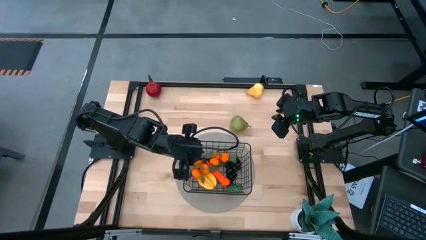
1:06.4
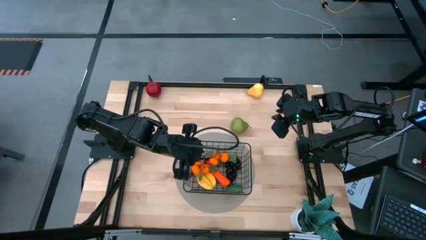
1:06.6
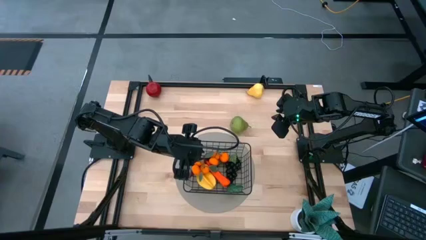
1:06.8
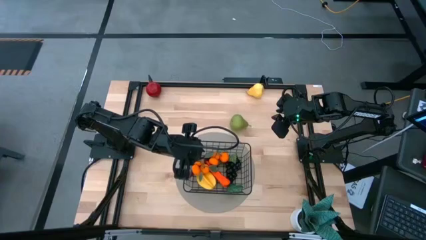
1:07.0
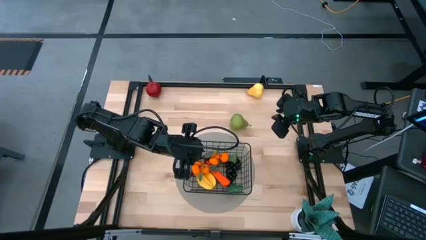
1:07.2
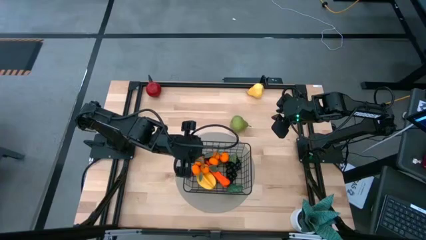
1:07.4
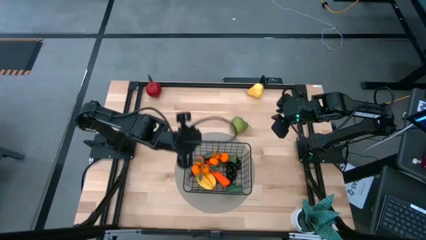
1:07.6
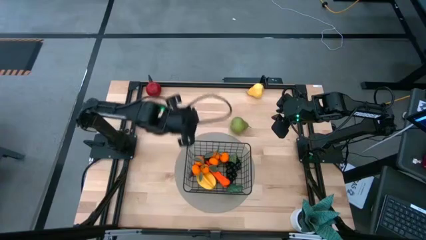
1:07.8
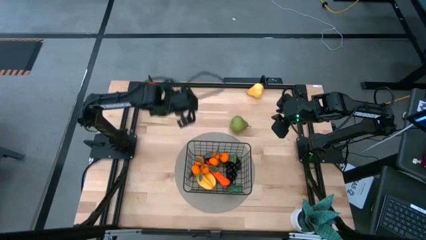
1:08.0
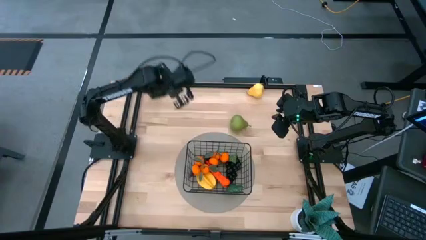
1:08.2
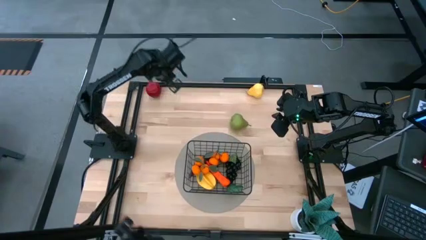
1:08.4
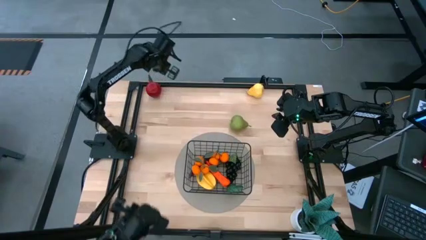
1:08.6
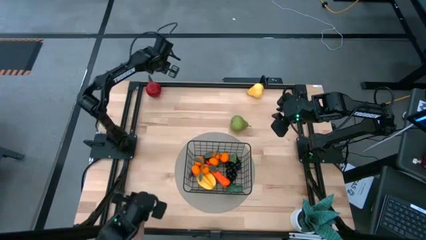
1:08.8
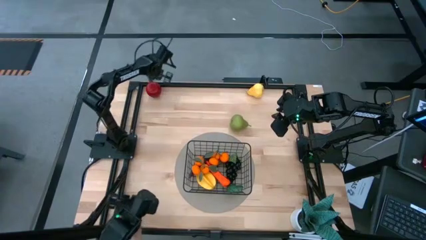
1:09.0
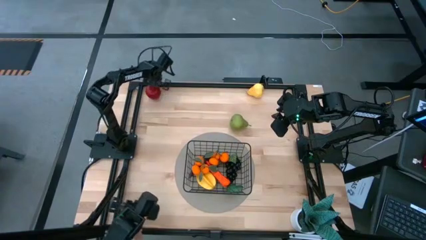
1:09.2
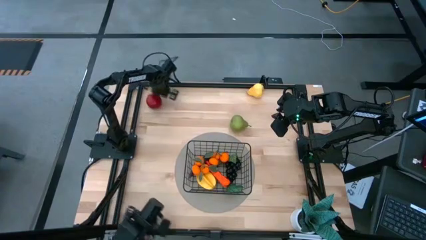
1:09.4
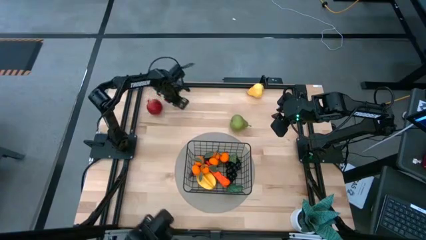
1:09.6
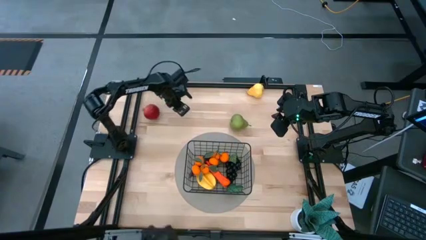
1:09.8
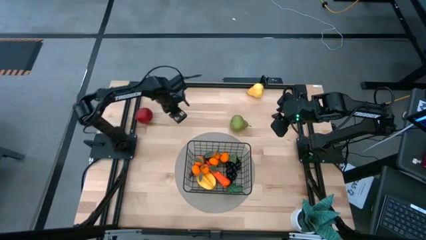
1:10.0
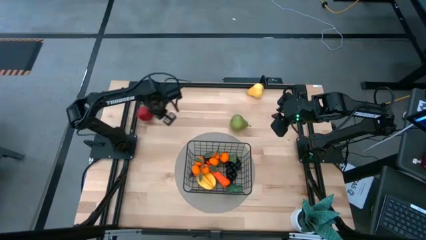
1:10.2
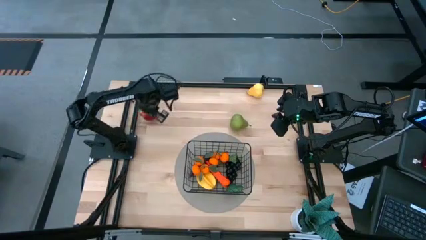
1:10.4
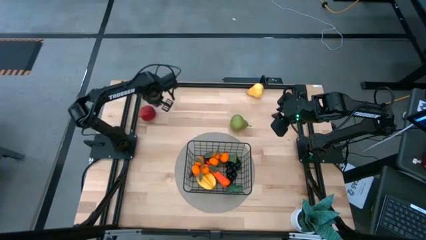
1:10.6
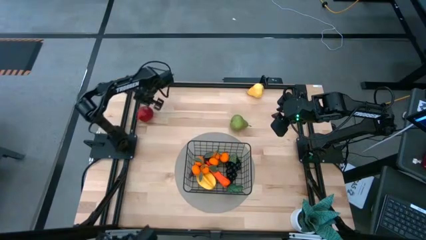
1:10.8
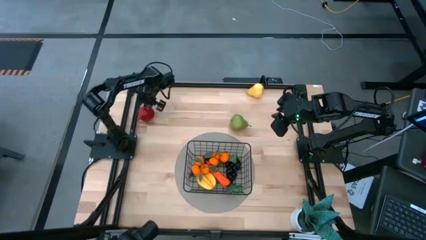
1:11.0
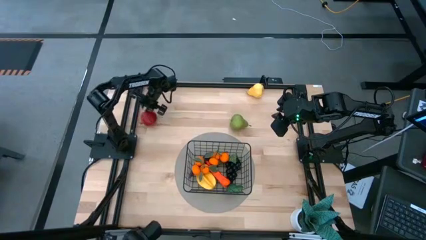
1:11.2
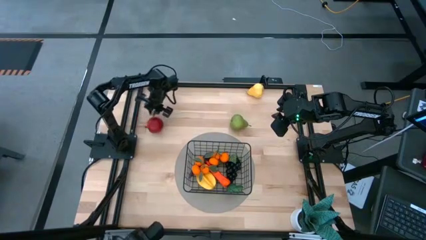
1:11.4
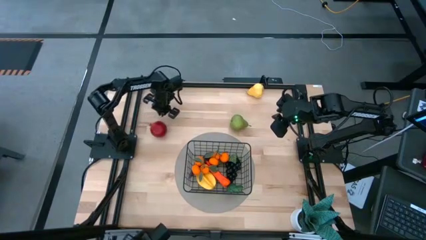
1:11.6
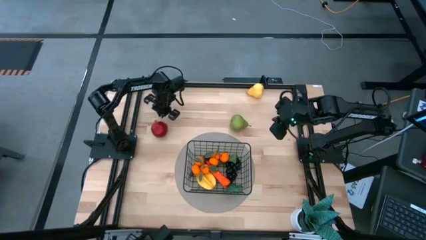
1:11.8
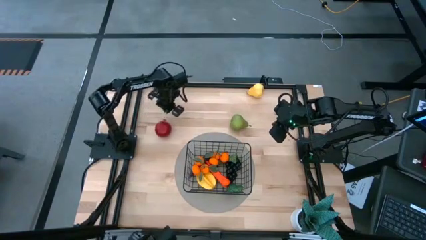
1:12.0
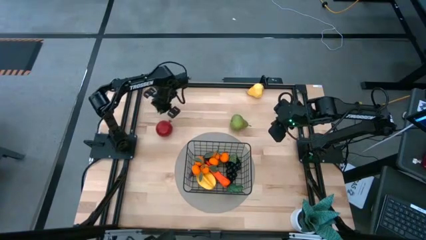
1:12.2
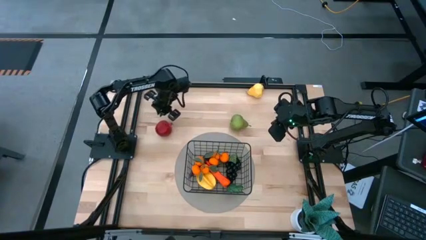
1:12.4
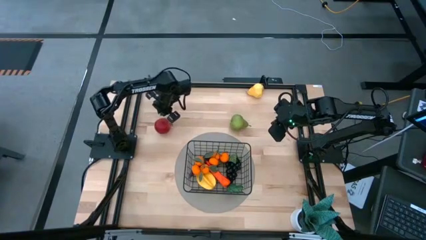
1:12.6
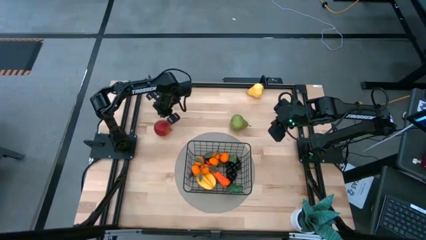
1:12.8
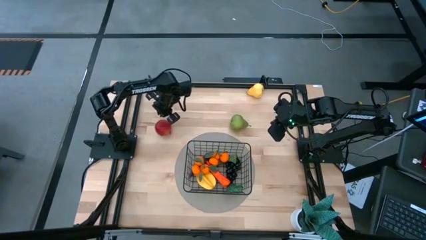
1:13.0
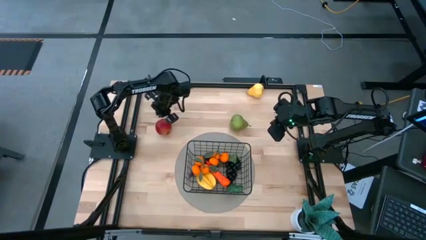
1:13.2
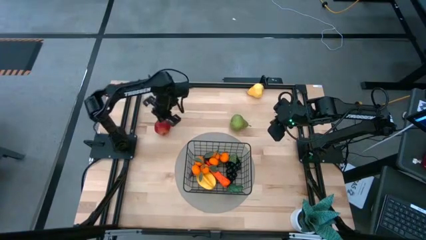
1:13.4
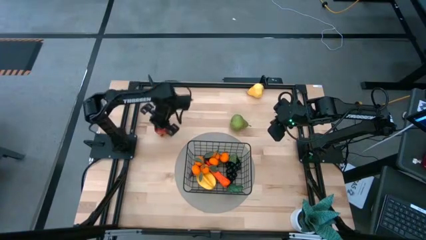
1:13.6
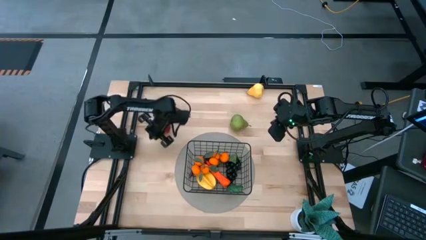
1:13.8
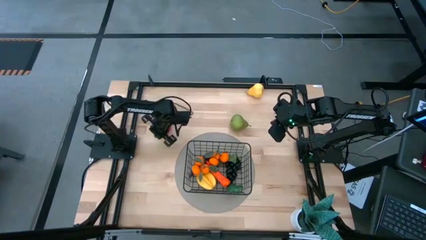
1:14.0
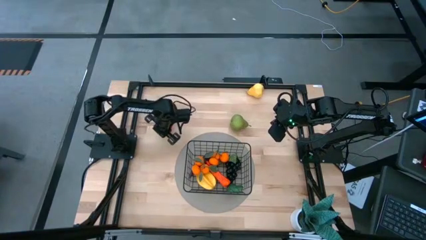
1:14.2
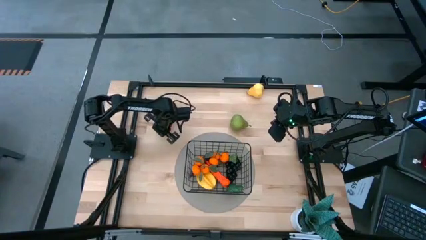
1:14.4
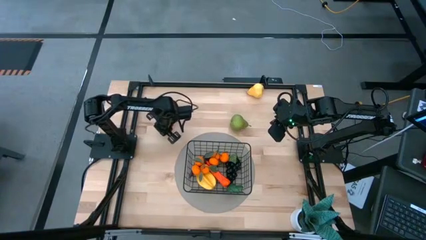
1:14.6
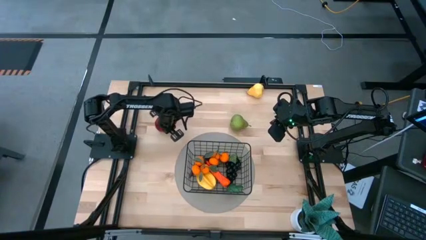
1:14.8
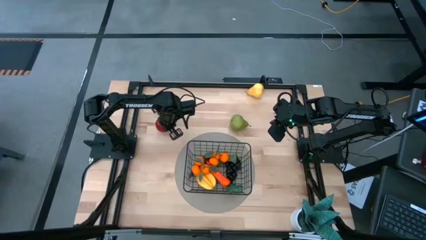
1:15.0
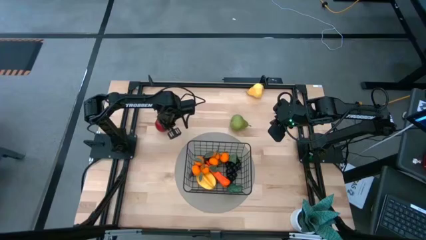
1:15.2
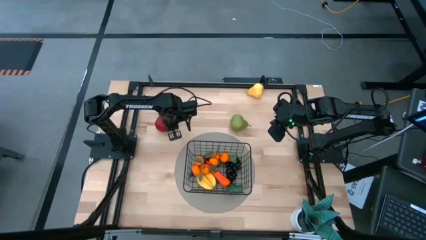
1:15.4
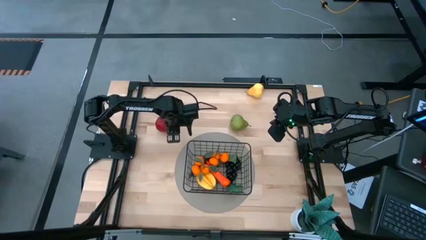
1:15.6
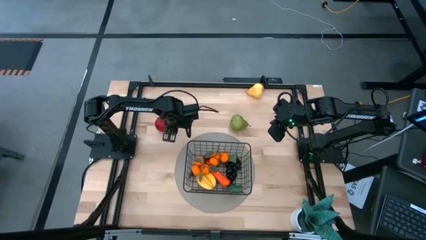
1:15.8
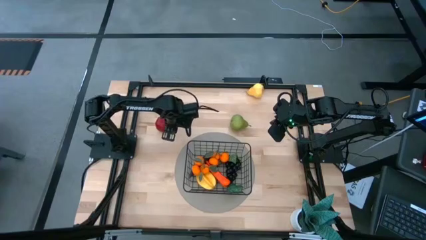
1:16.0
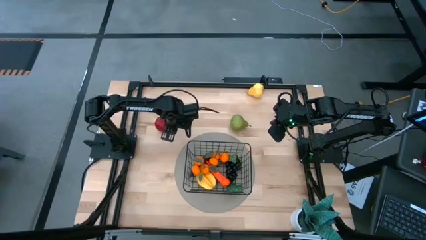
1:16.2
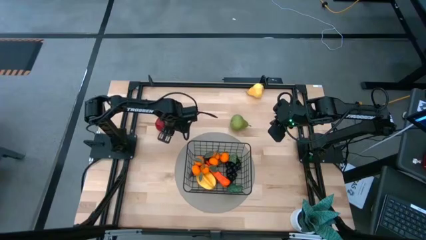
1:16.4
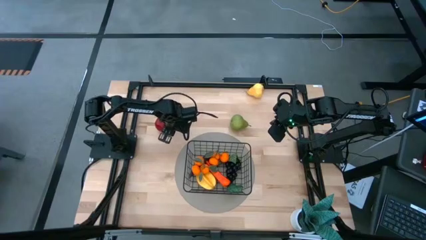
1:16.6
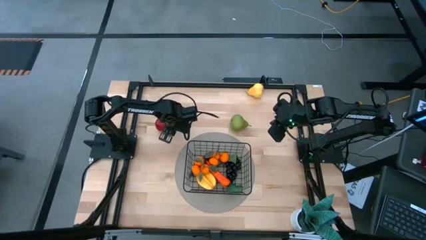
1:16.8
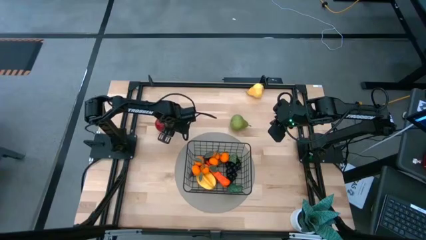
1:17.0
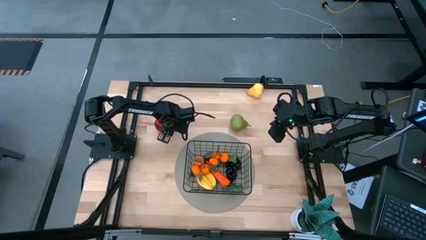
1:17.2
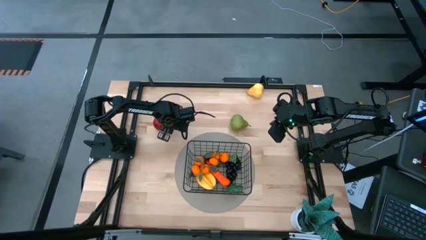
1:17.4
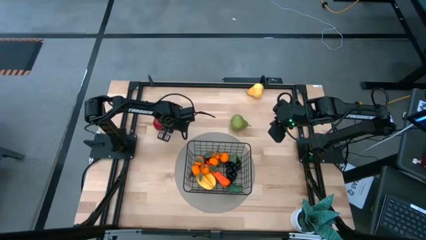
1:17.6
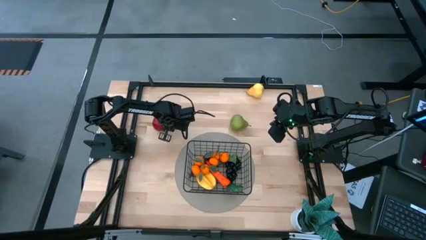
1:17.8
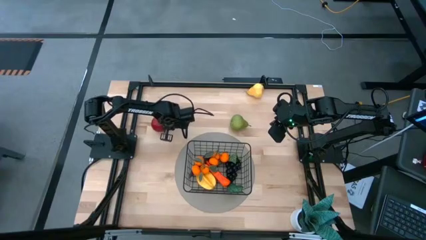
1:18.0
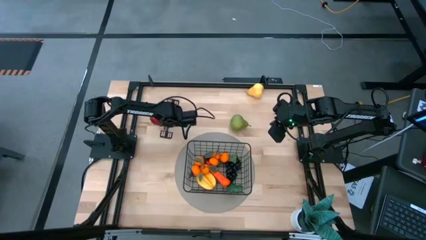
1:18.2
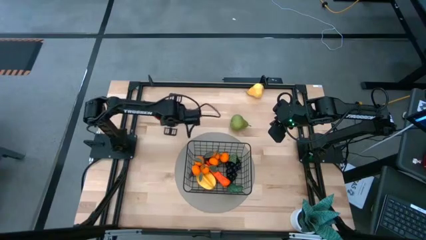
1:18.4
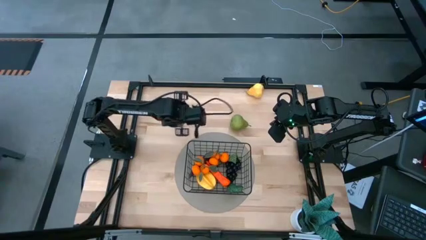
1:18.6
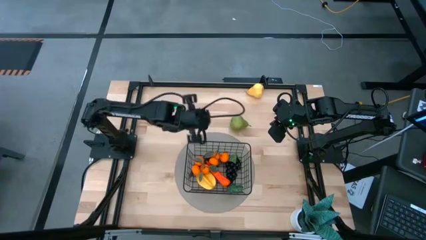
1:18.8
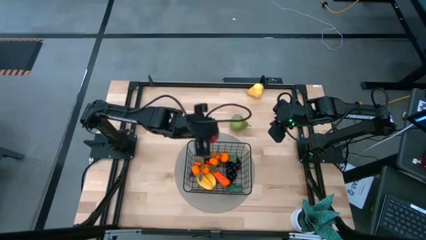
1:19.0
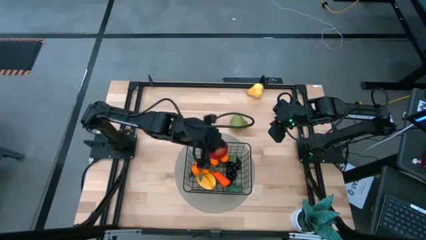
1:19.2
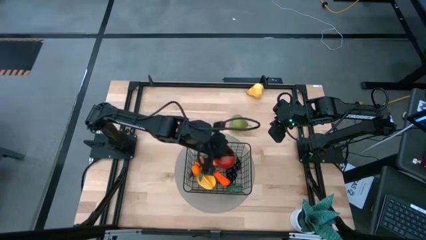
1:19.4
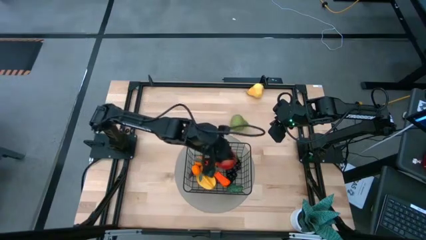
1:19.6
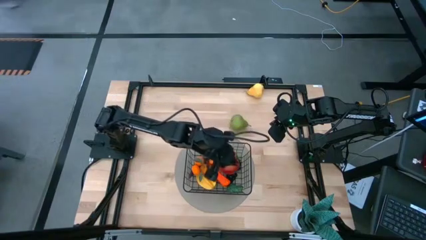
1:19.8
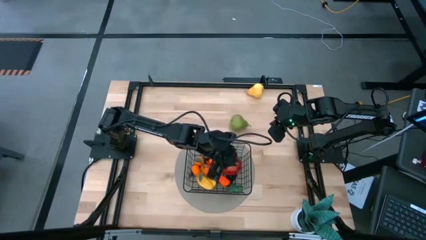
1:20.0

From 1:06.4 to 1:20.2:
Task: Build produce basket
Put the pomegranate into the wire basket

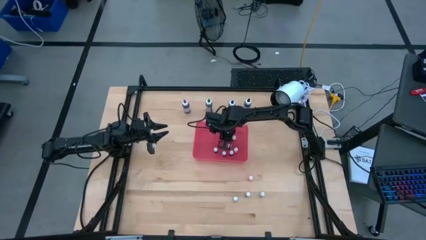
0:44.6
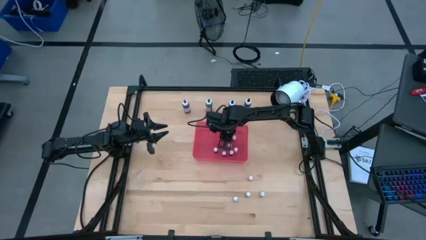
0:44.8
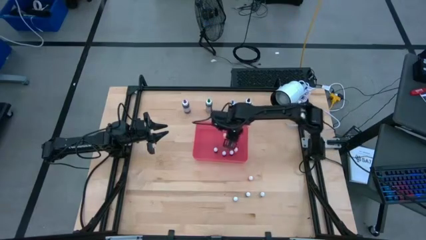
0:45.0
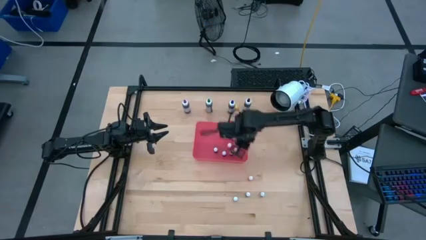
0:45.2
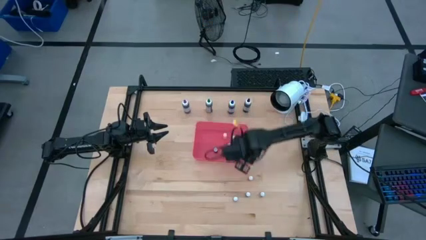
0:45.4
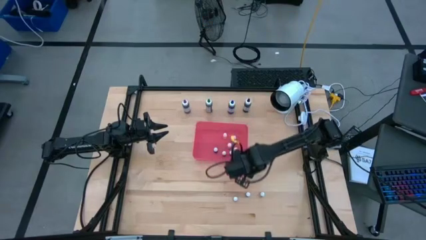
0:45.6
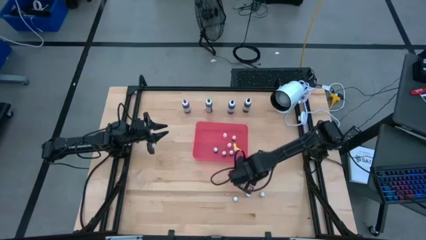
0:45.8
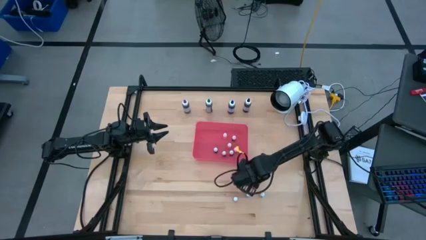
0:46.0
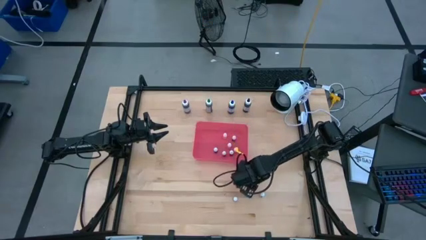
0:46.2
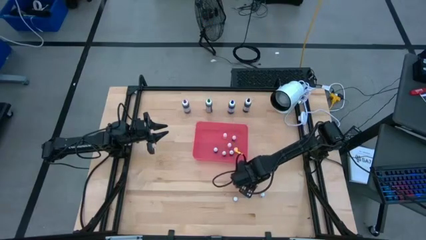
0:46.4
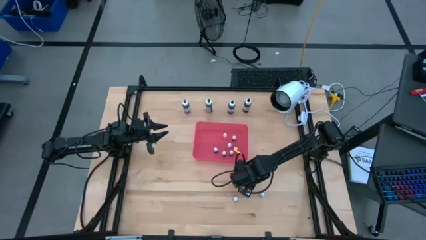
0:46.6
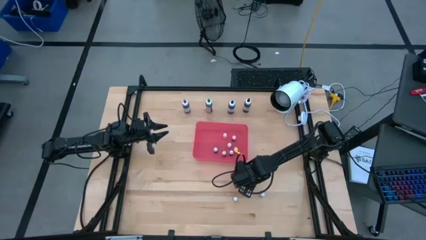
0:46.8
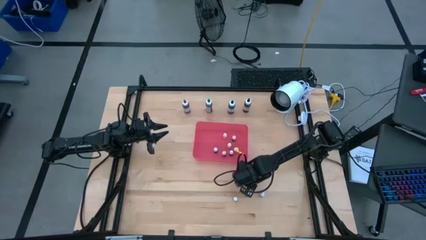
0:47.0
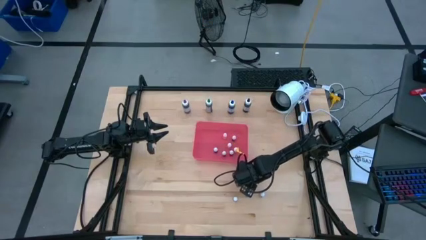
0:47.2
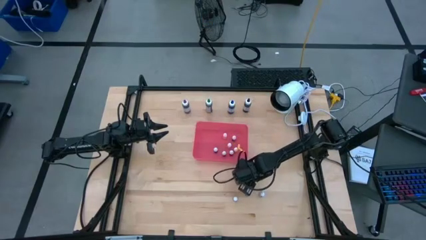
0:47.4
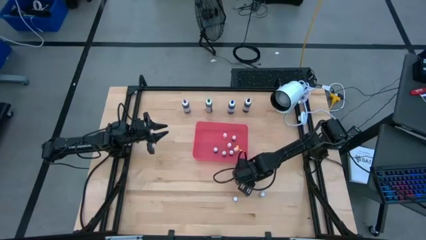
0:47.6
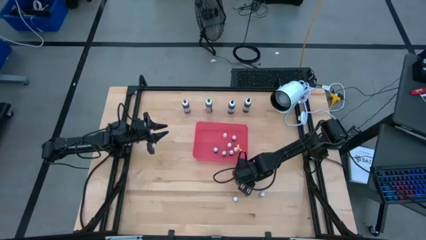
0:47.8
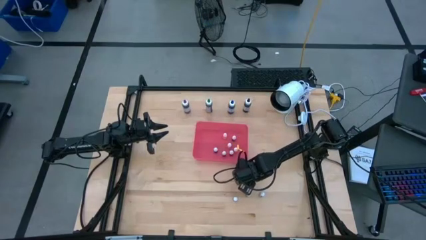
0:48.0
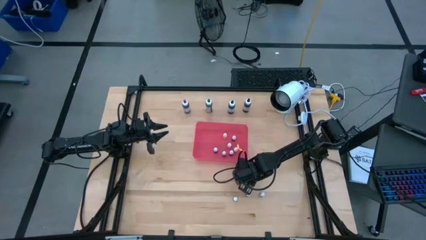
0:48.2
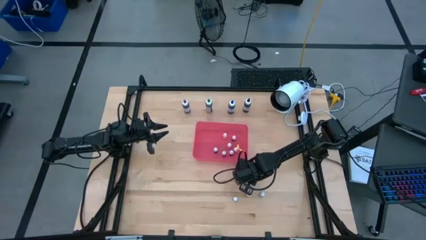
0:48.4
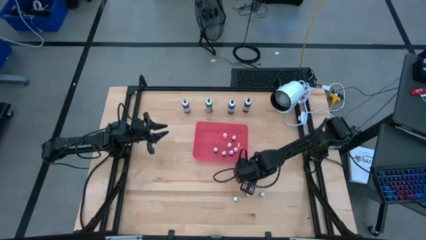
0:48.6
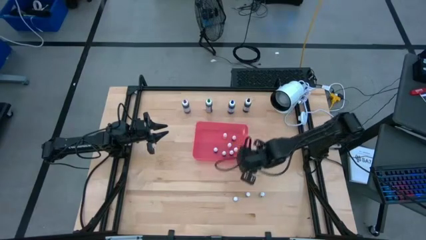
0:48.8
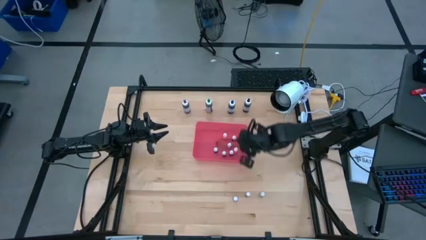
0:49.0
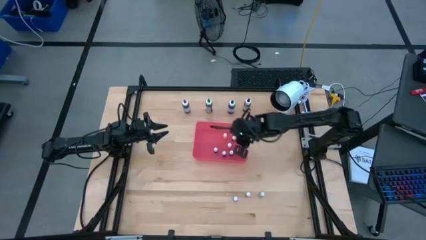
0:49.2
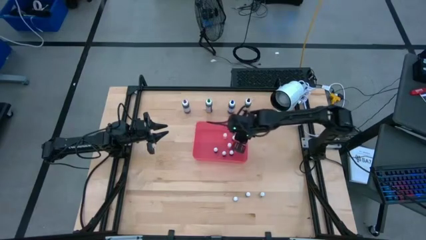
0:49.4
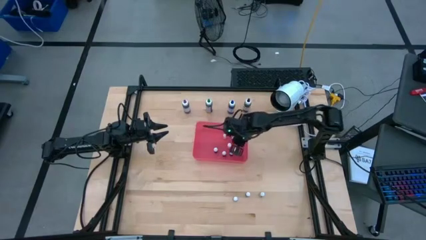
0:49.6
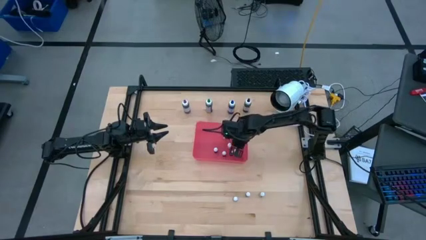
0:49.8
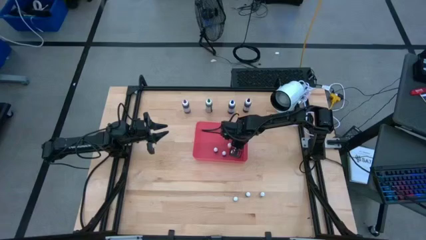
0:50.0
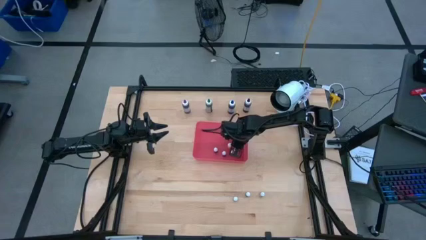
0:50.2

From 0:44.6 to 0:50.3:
Task: Pick & Place food coloring
Put the small orange food coloring bottle into the red bin
